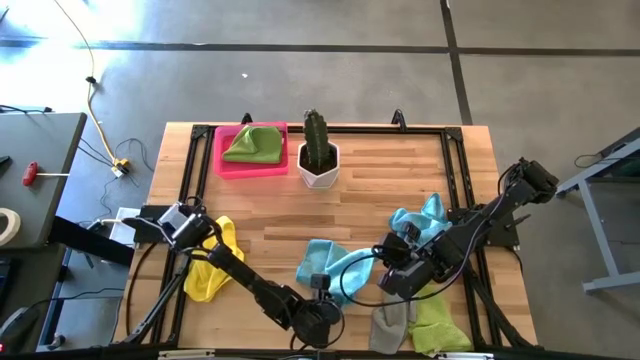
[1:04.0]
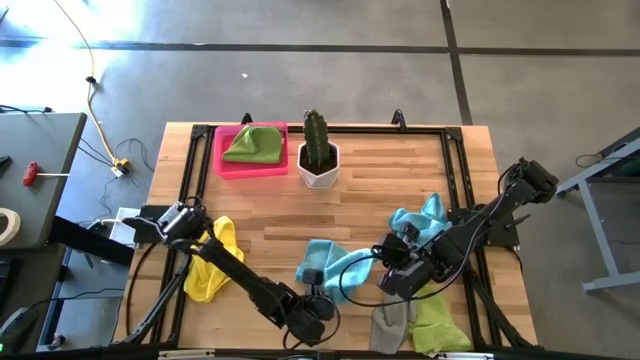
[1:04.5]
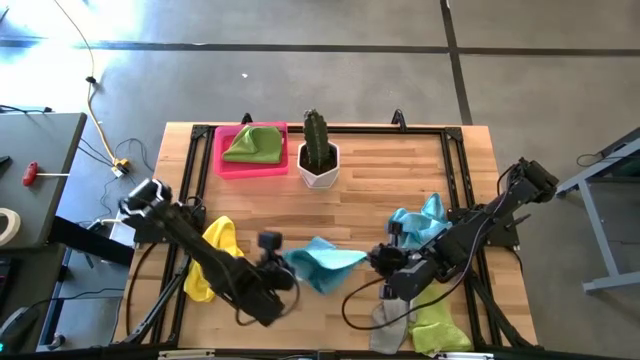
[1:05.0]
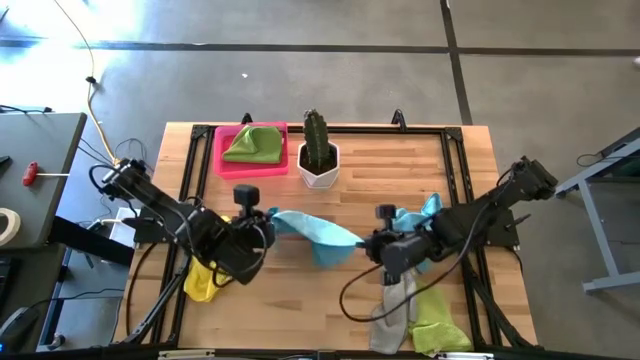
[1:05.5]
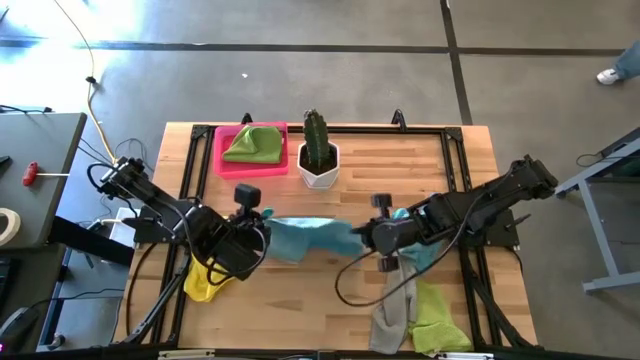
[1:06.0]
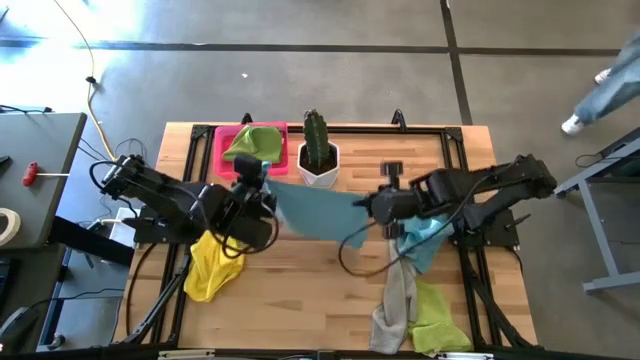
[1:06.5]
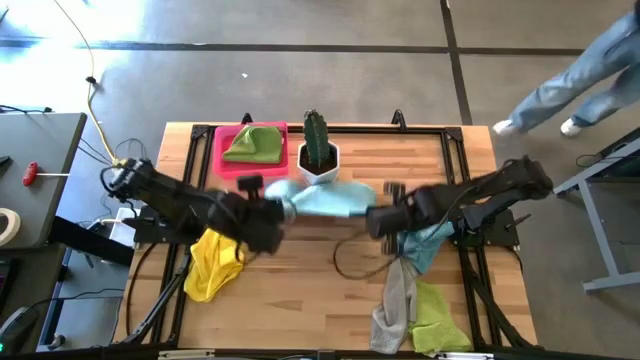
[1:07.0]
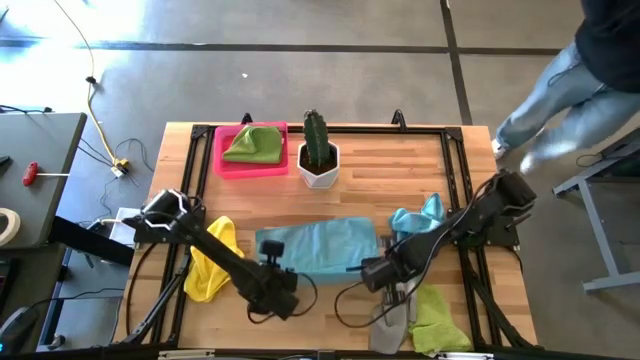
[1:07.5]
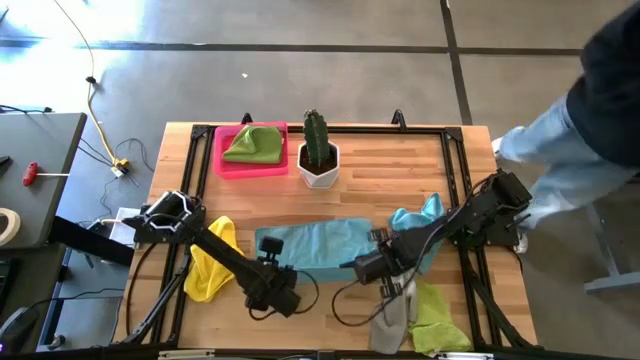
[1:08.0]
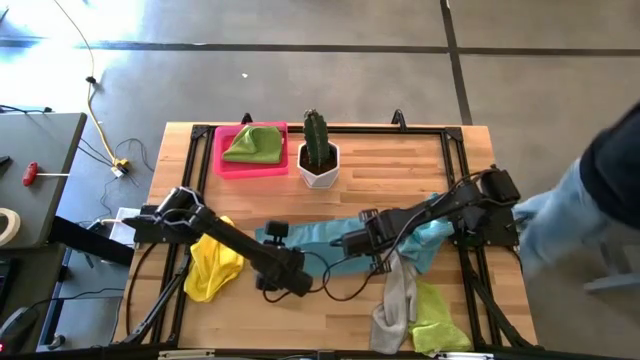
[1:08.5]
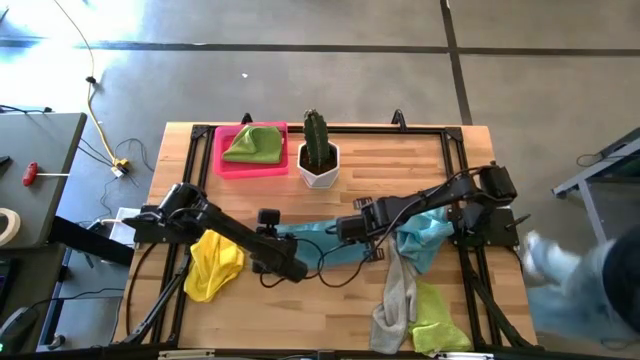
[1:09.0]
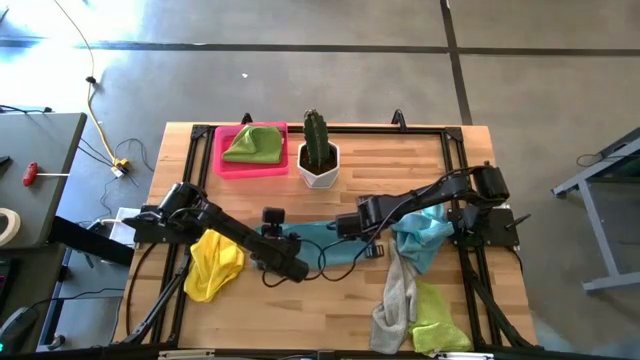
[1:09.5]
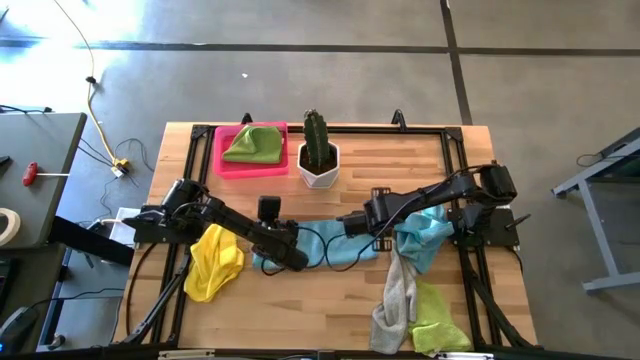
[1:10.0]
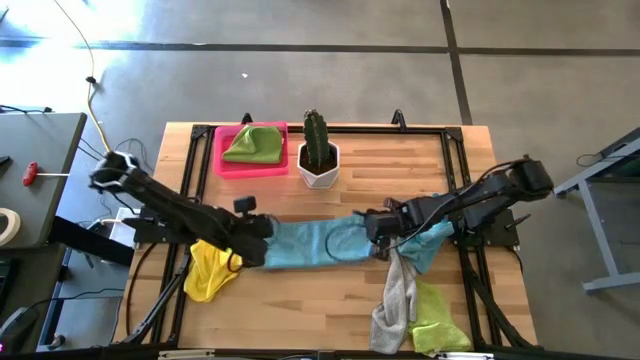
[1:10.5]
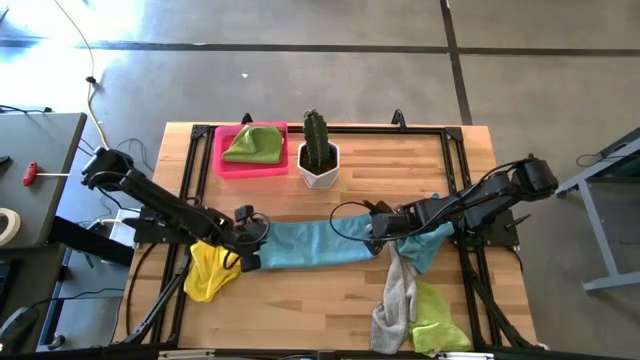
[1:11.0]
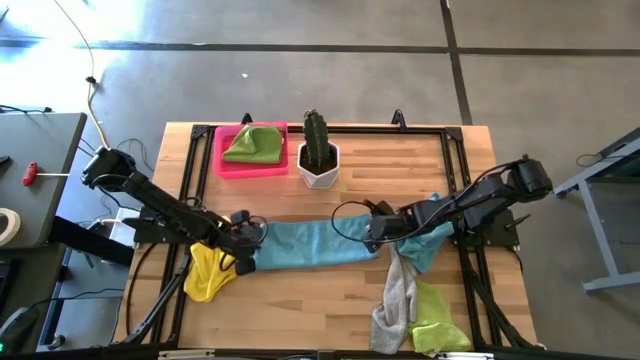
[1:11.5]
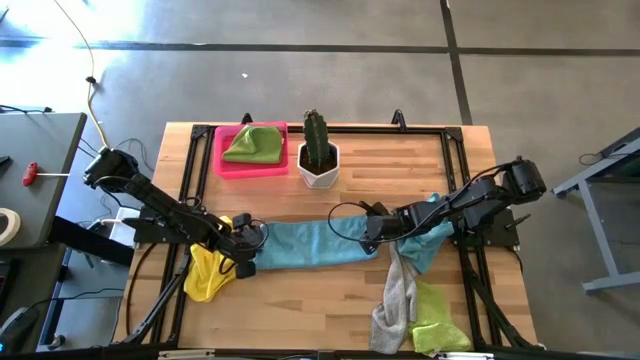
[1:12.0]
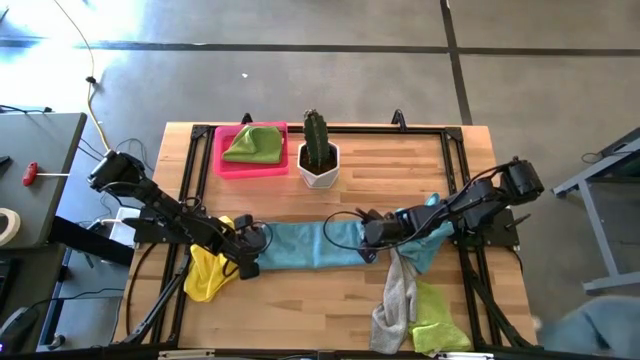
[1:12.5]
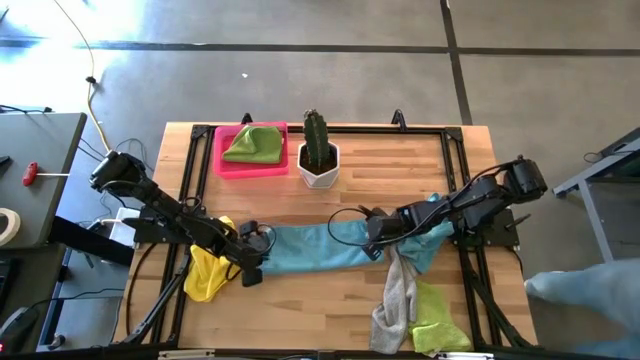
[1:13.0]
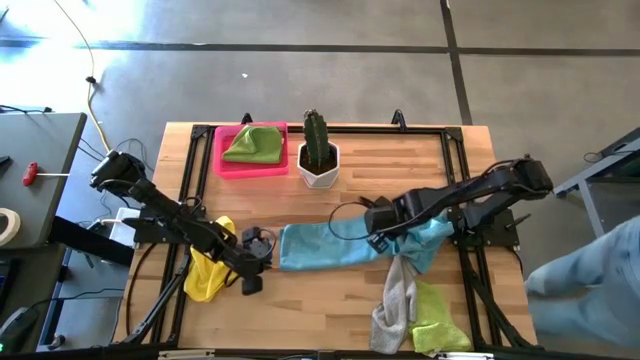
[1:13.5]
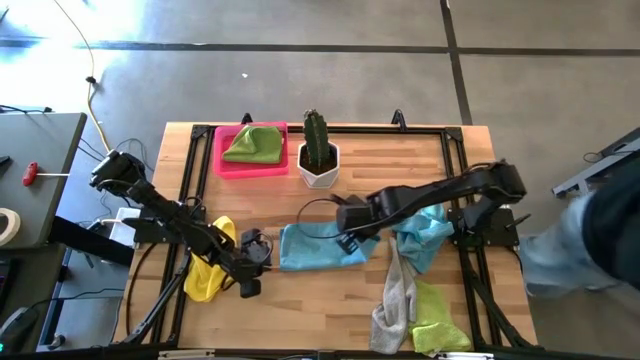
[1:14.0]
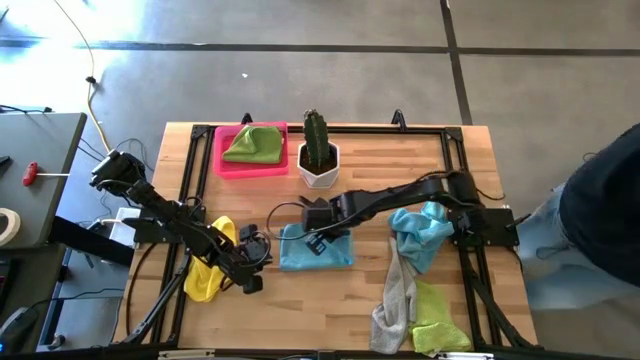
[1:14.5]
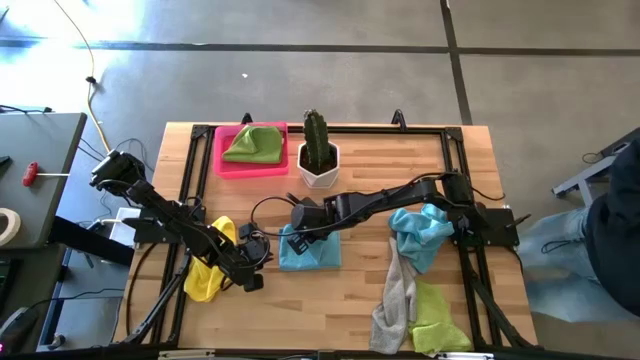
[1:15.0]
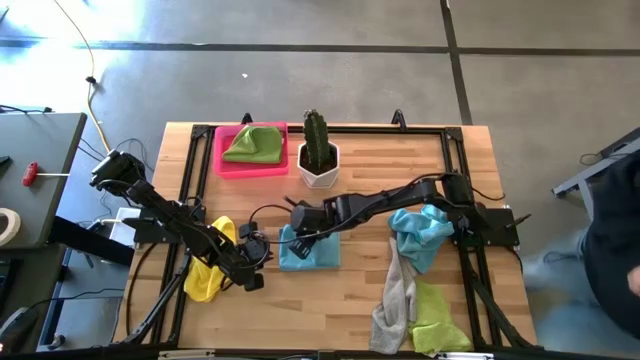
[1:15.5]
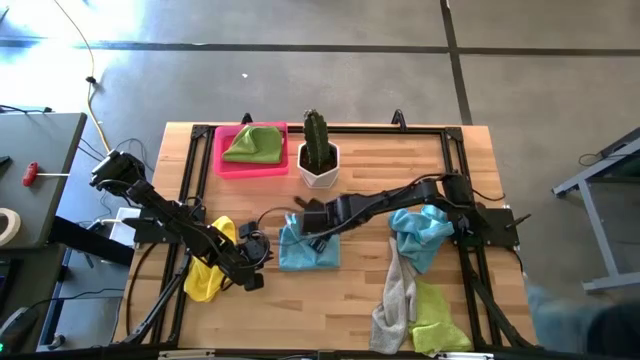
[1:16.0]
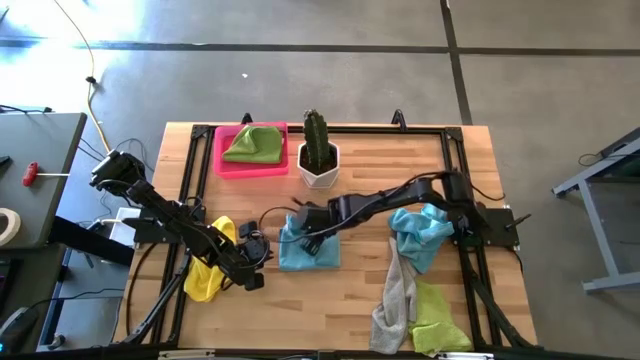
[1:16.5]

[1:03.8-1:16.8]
Task: Fold microfiber towels
Fold the left blue microfiber towel

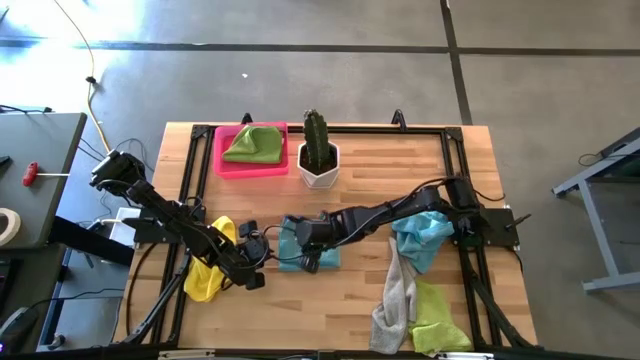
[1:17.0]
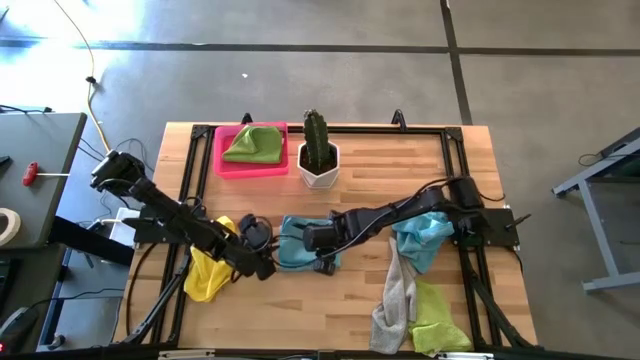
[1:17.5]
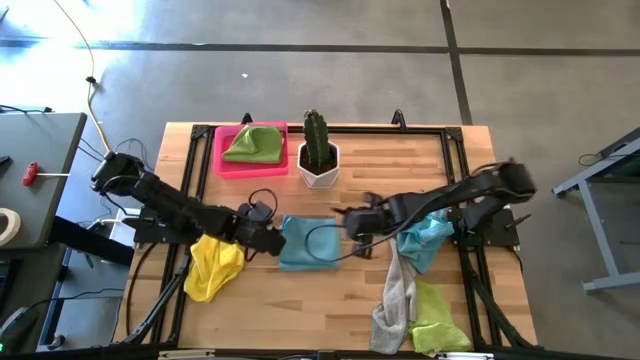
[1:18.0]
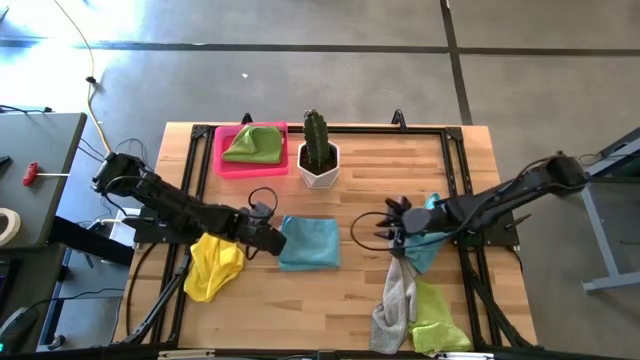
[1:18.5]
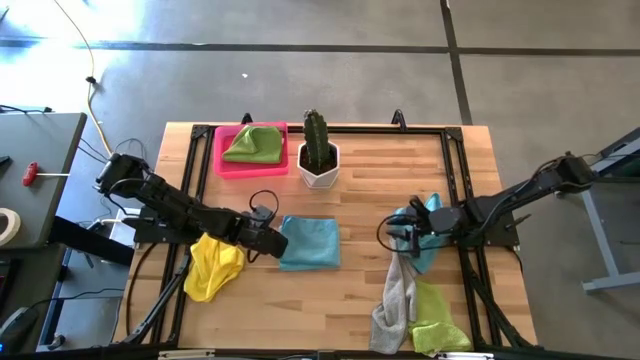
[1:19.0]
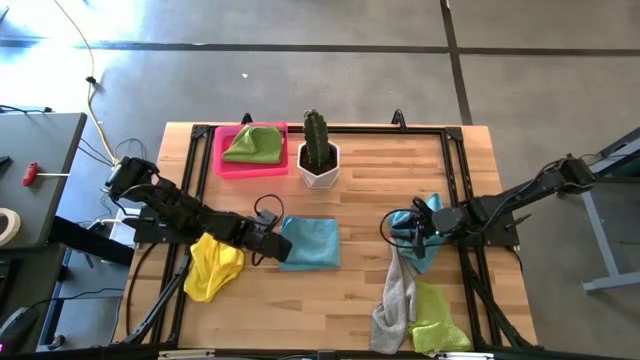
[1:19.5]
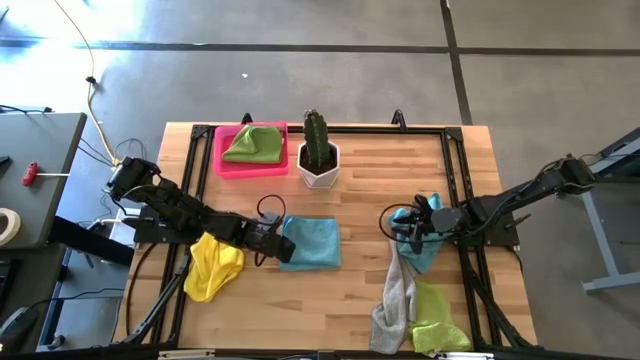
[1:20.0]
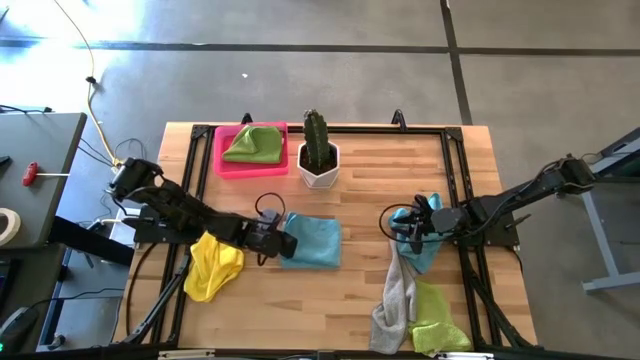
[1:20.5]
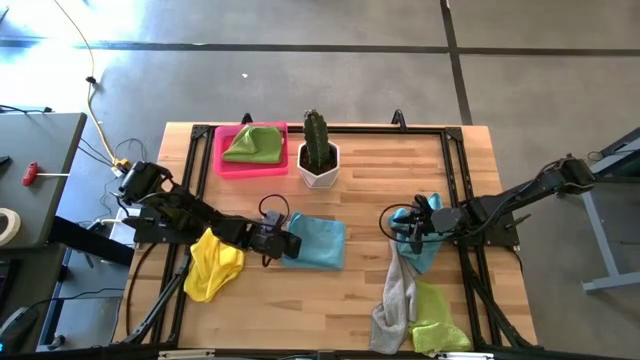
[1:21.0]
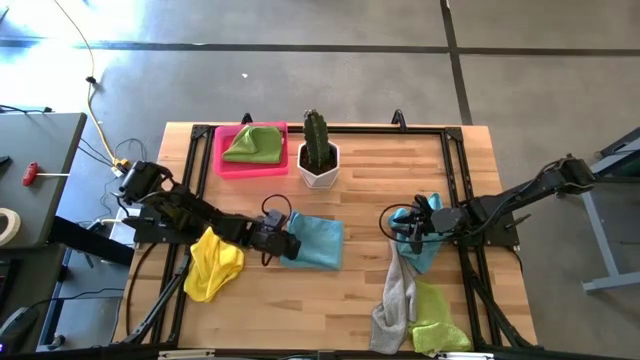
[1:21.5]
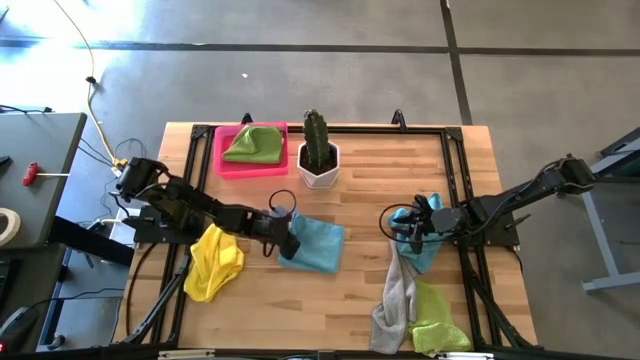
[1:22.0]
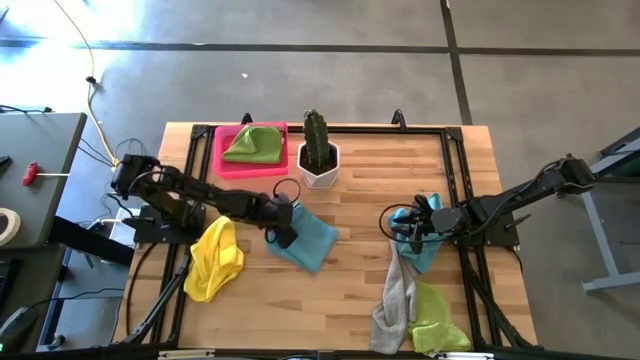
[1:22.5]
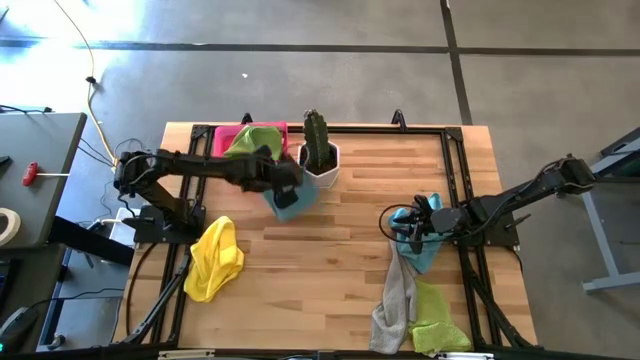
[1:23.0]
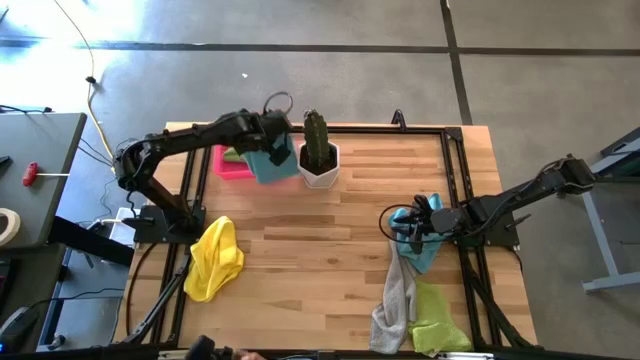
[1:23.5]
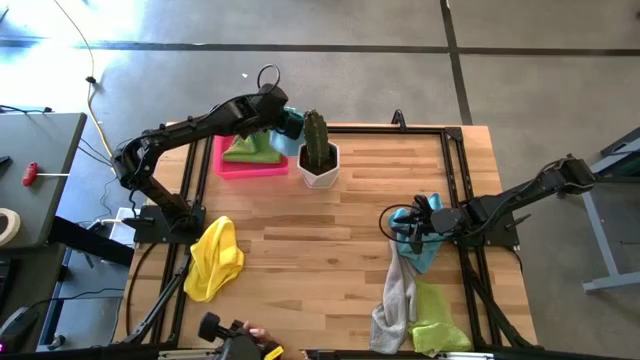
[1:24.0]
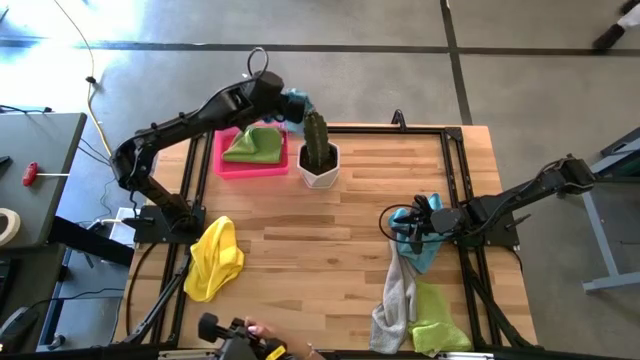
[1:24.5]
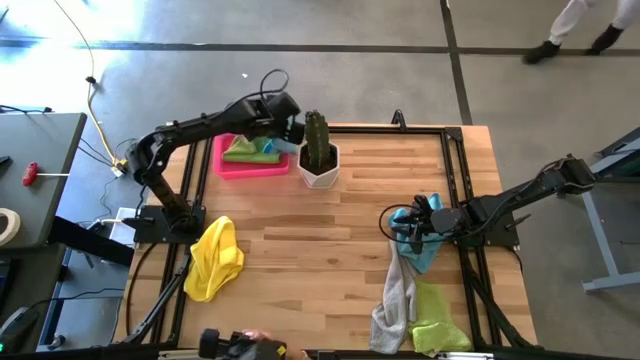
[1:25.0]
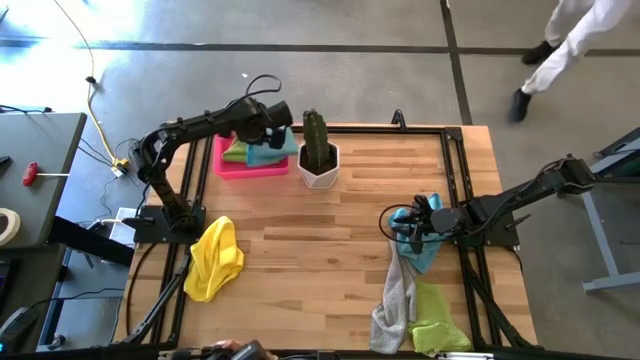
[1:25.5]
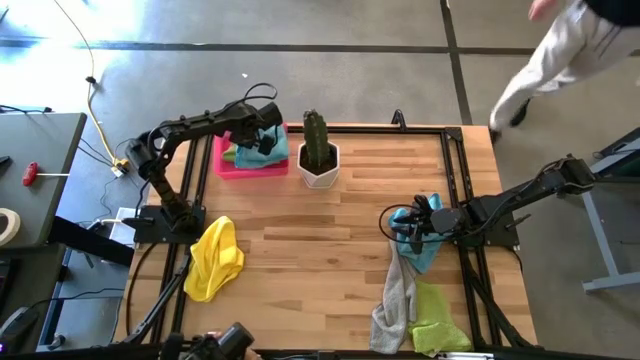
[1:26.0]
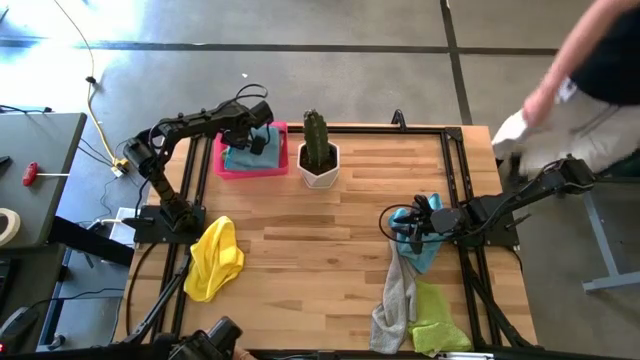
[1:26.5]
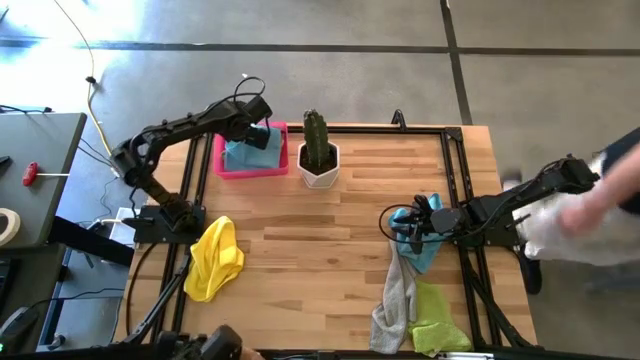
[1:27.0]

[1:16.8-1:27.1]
Put the left folded blue microfiber towel on the pink bin
